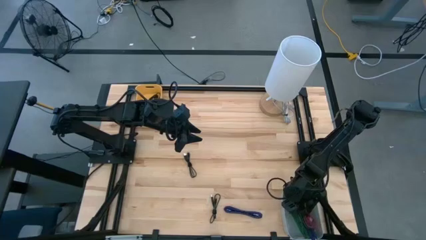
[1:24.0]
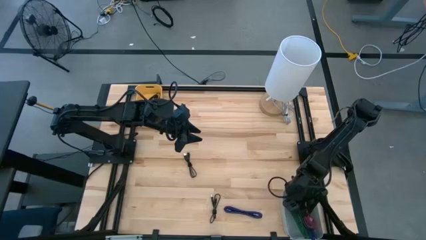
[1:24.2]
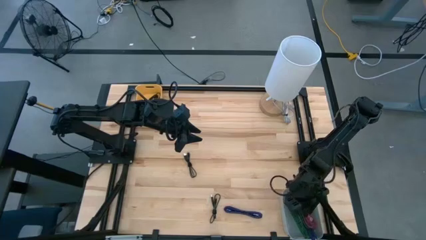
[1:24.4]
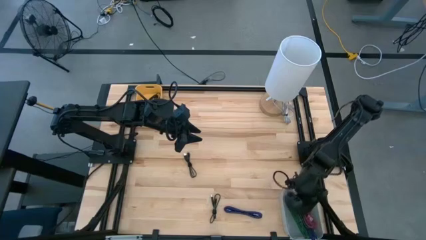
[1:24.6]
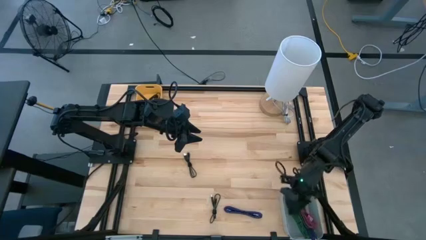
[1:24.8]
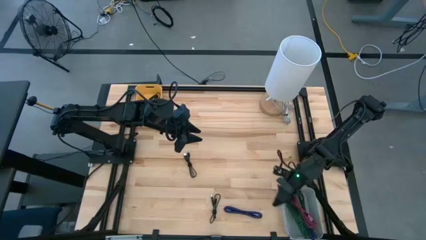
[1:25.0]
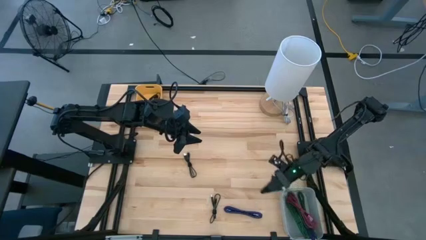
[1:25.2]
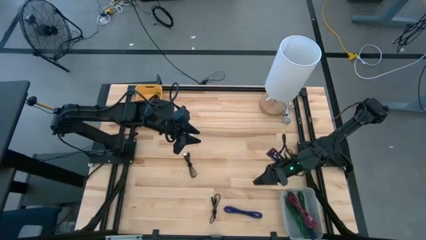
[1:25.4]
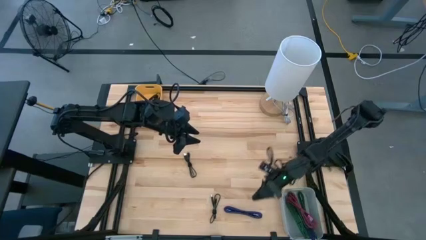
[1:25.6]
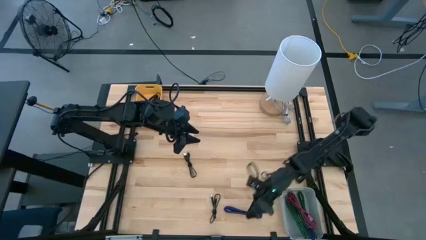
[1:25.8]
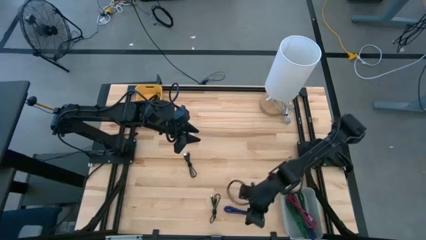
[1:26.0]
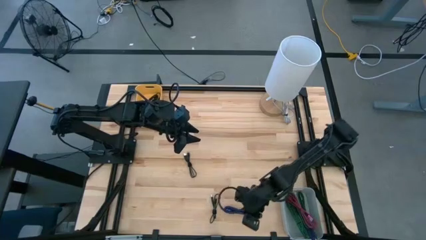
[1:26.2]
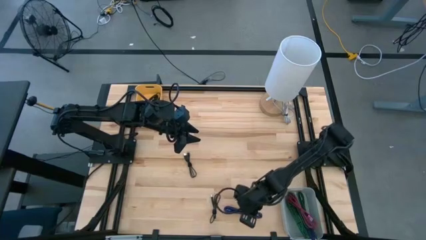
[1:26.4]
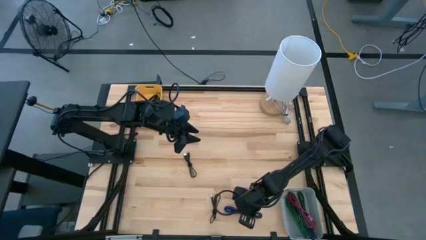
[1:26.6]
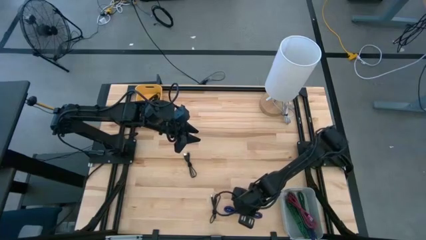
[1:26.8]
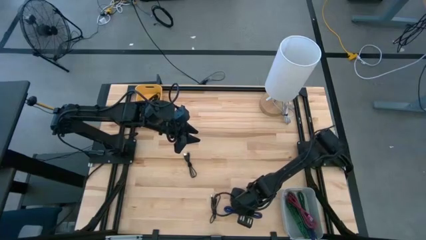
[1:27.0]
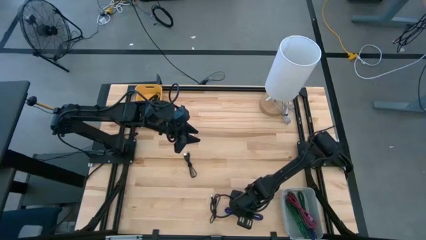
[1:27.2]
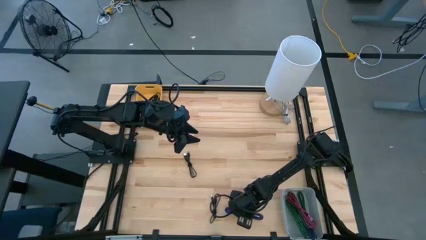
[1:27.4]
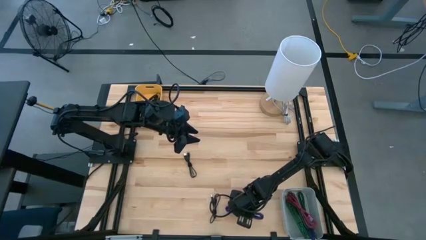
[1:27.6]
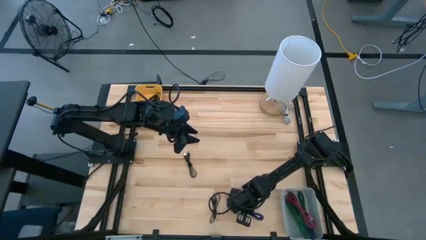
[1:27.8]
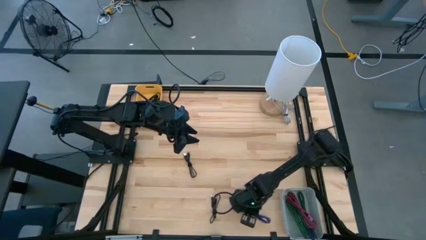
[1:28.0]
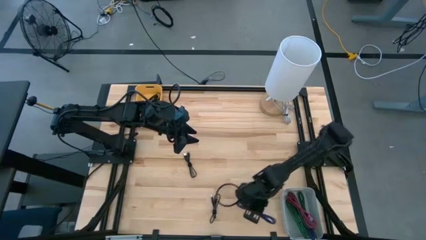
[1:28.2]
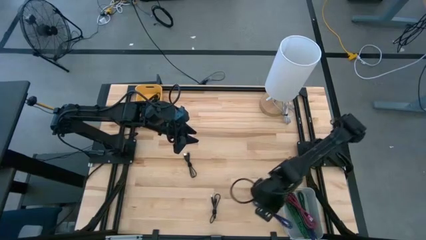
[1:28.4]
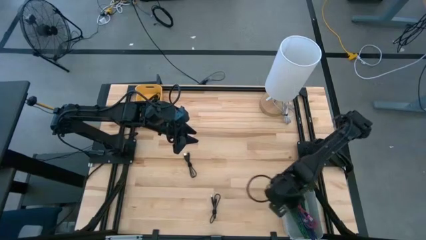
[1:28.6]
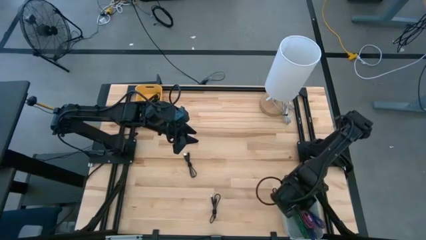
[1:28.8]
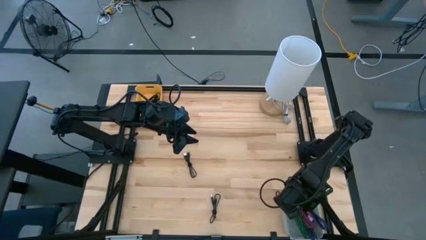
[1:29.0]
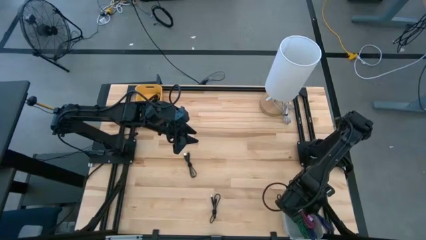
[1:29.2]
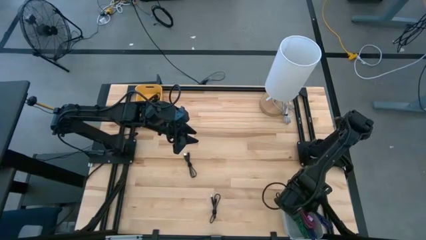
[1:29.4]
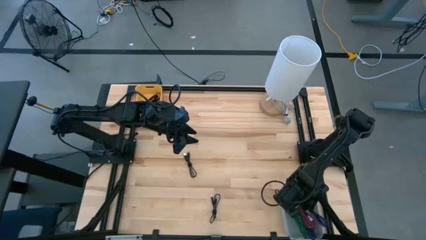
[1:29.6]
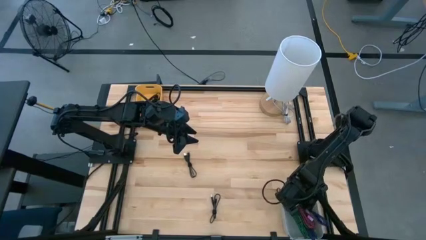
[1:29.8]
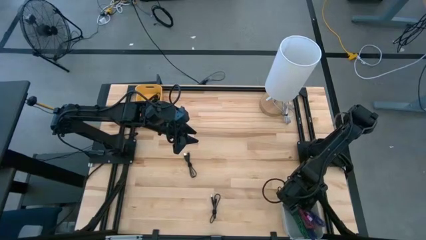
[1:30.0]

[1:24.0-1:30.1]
Task: Pick & Place USB Port
Put the violet charger cable into the gray bin

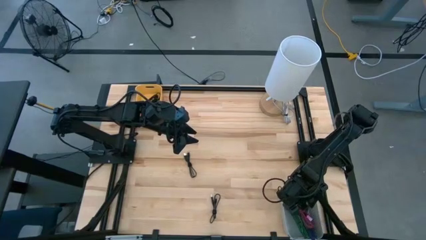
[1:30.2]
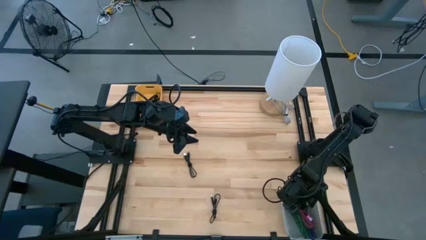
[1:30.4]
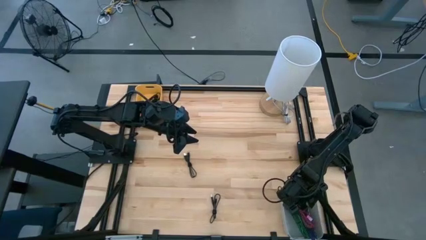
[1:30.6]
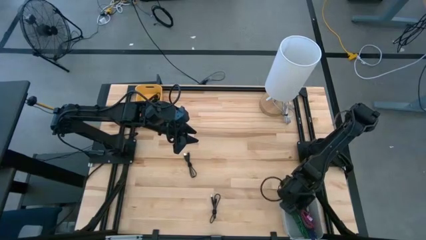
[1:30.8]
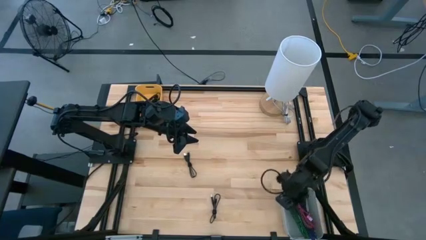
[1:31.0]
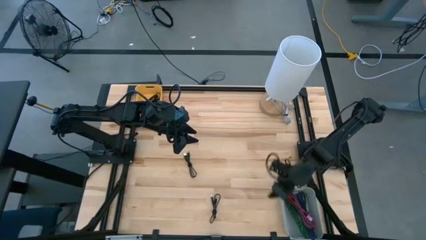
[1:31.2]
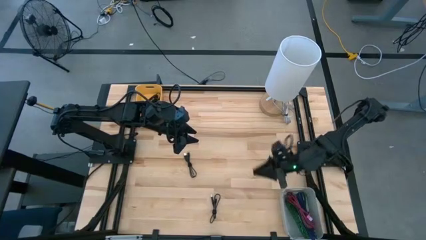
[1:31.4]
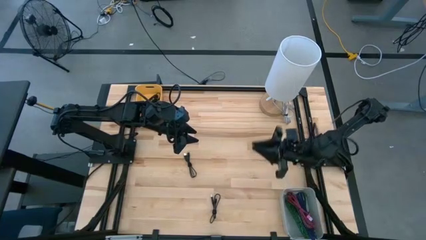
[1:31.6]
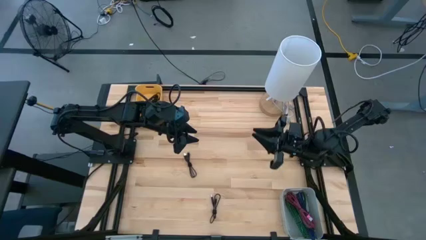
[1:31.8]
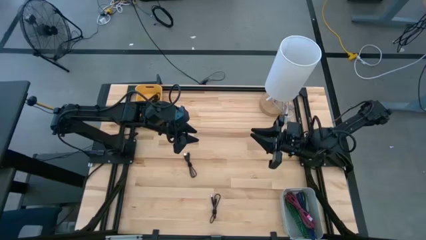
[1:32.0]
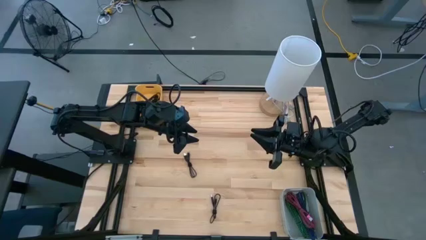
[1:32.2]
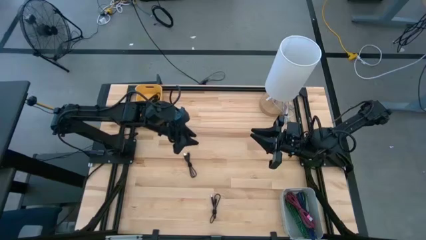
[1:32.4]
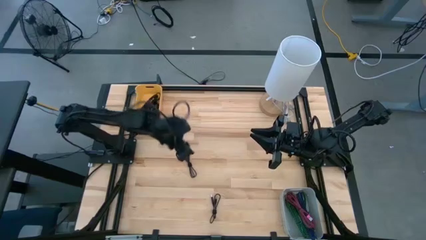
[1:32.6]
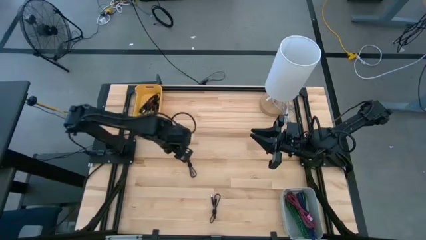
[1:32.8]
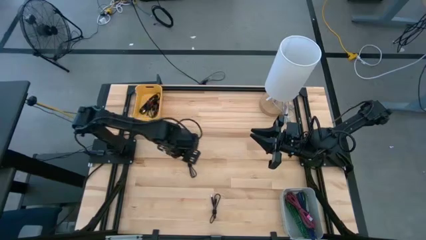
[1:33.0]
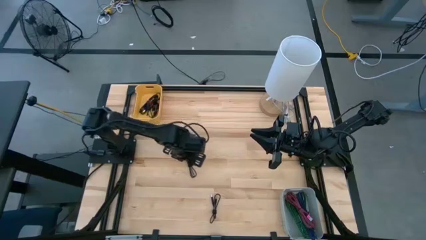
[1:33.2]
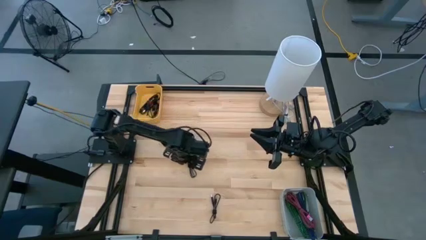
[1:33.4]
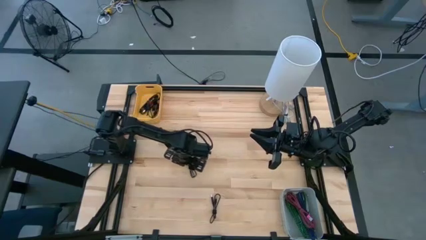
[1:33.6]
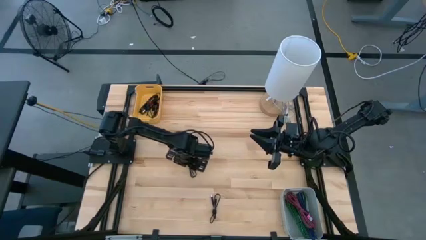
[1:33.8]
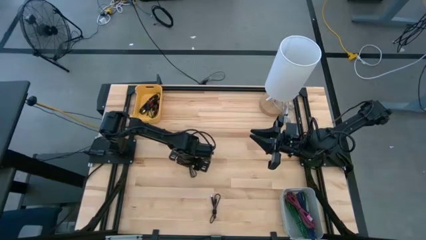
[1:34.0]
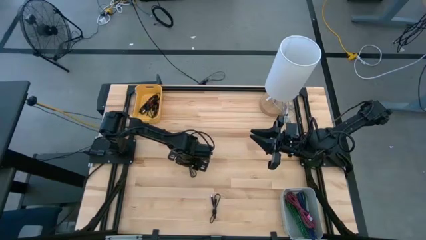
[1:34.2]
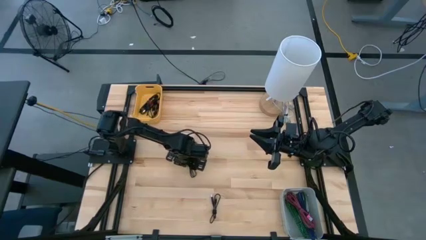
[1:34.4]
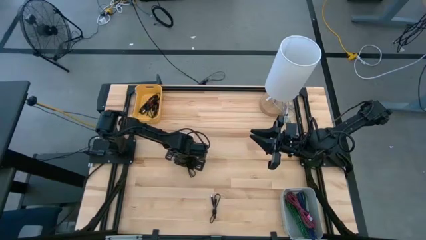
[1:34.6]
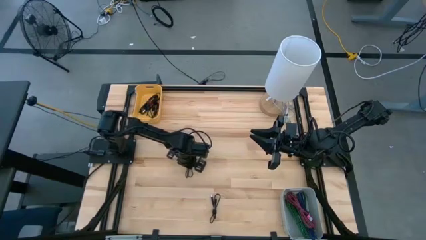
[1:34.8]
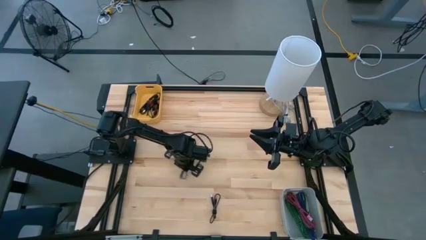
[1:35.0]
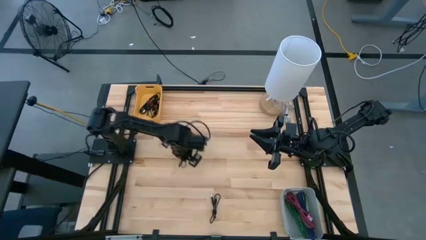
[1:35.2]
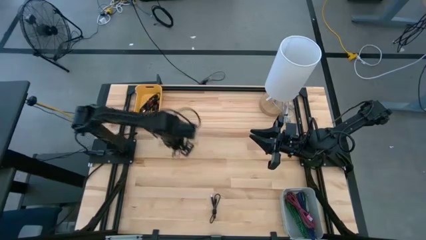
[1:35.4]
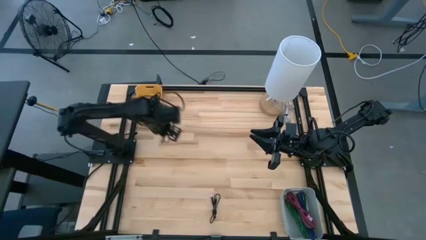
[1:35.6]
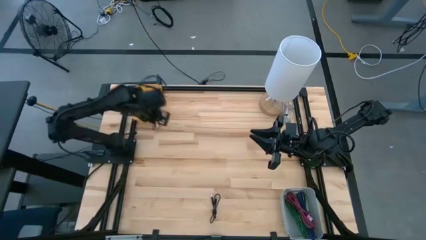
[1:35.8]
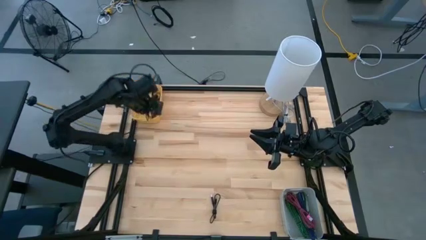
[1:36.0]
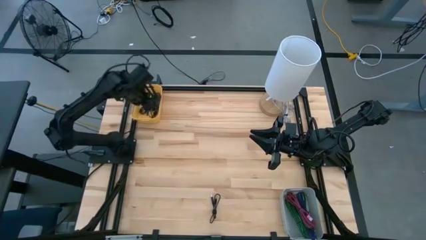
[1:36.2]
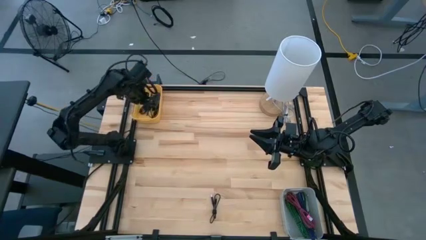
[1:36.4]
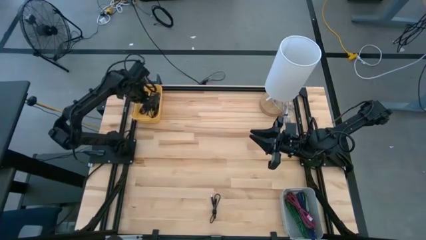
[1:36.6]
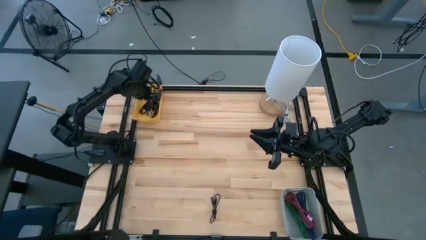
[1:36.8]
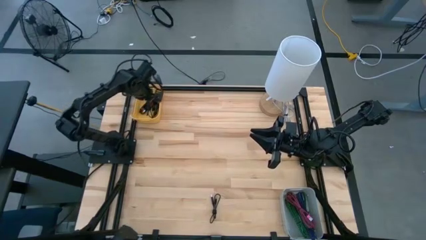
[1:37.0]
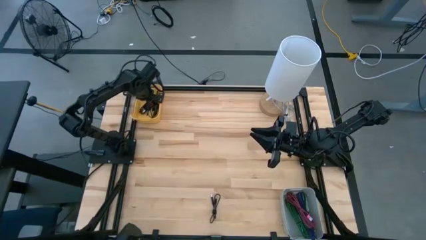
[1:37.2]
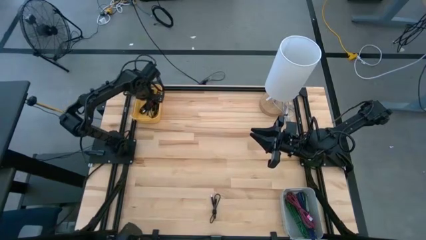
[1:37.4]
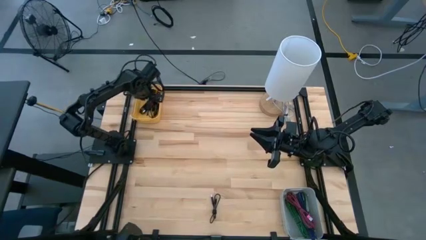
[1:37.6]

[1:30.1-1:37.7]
Put the black charger cable into the yellow bin
